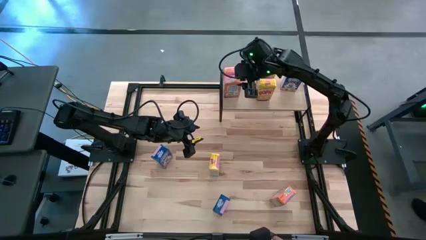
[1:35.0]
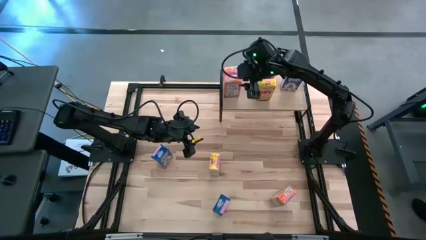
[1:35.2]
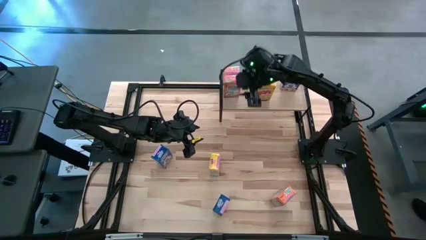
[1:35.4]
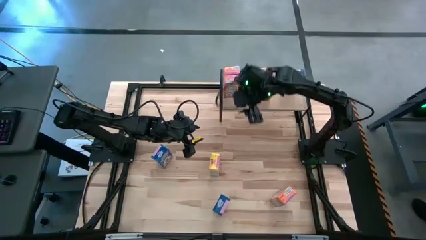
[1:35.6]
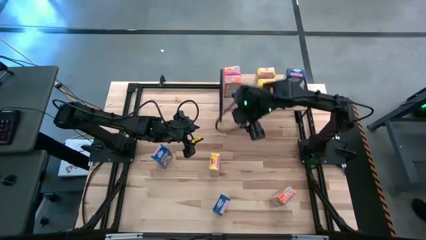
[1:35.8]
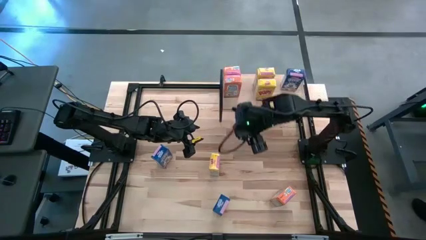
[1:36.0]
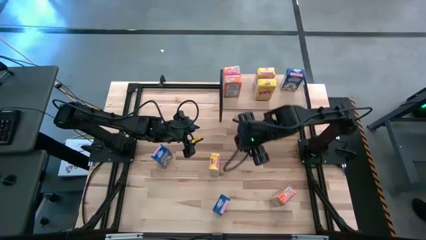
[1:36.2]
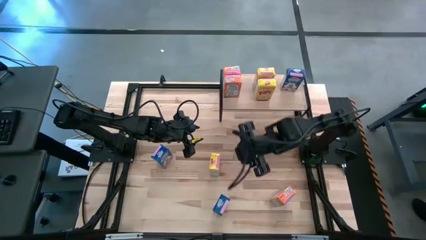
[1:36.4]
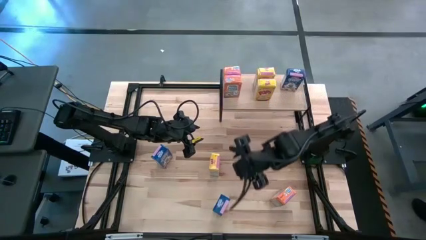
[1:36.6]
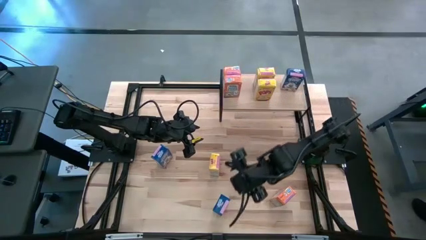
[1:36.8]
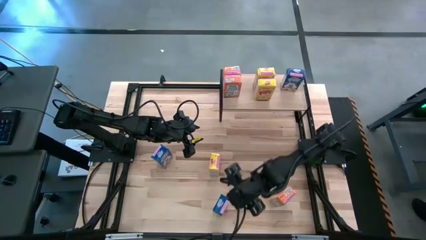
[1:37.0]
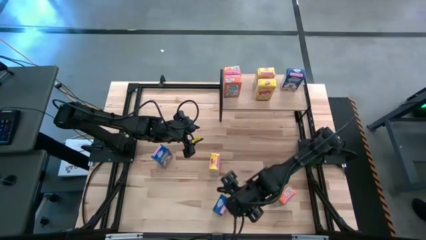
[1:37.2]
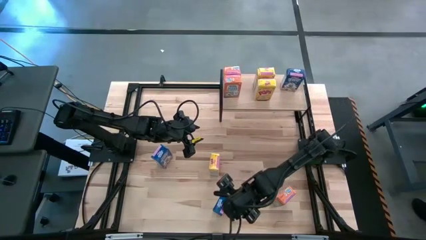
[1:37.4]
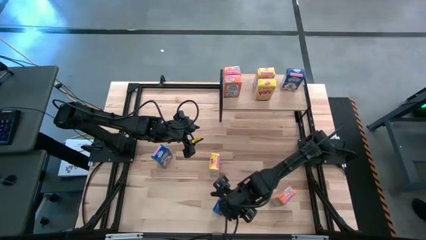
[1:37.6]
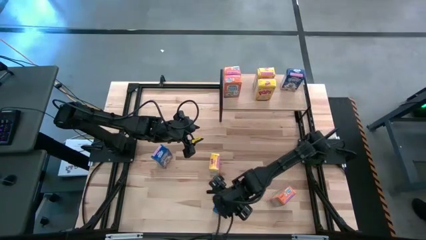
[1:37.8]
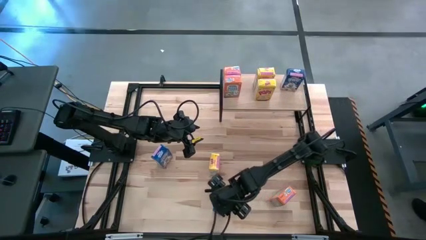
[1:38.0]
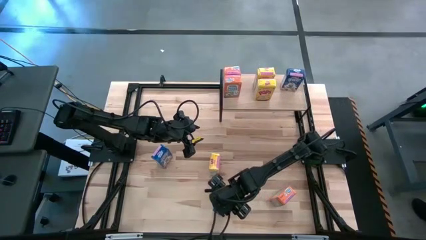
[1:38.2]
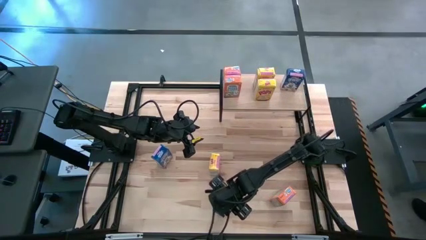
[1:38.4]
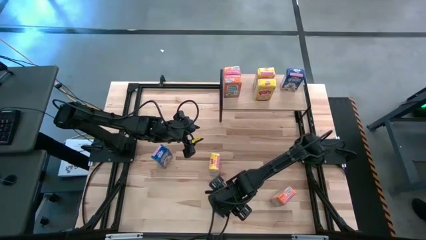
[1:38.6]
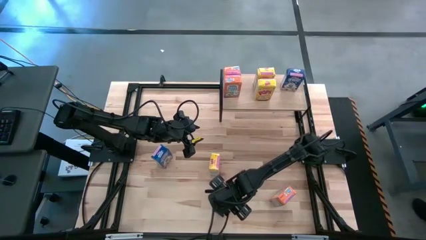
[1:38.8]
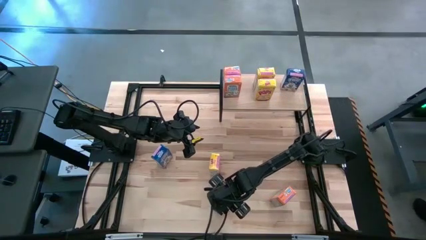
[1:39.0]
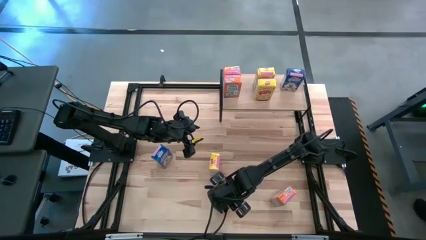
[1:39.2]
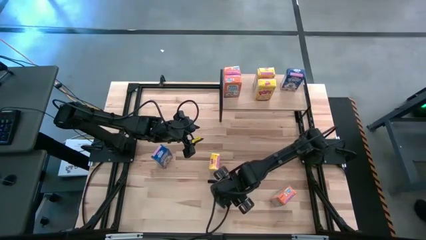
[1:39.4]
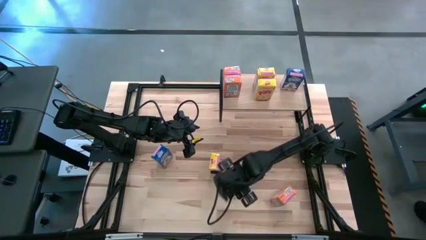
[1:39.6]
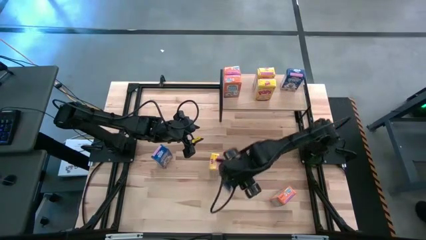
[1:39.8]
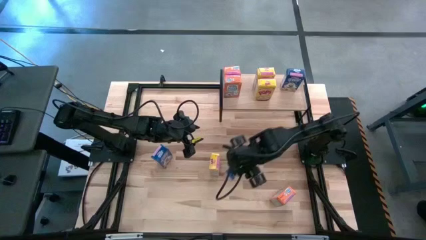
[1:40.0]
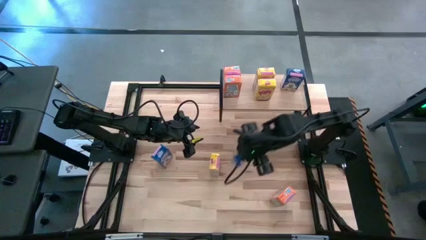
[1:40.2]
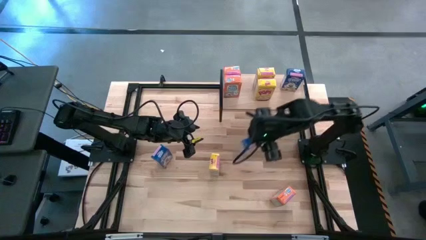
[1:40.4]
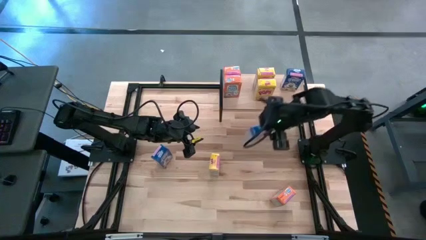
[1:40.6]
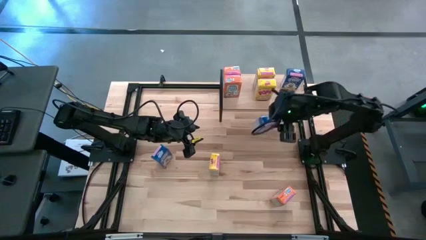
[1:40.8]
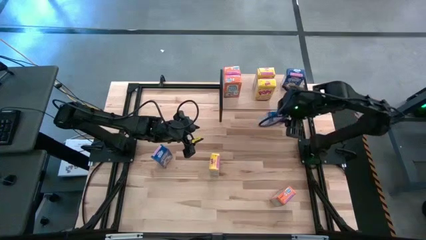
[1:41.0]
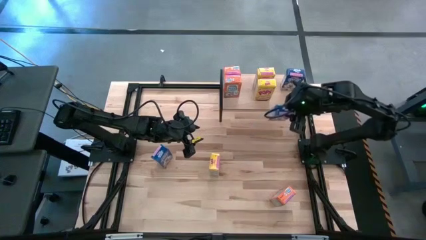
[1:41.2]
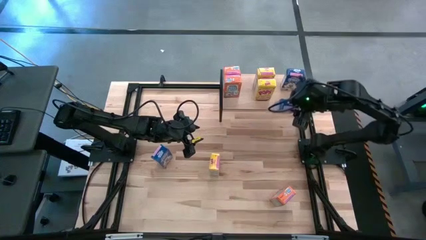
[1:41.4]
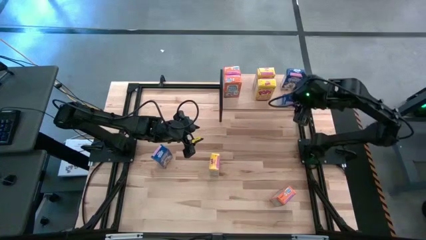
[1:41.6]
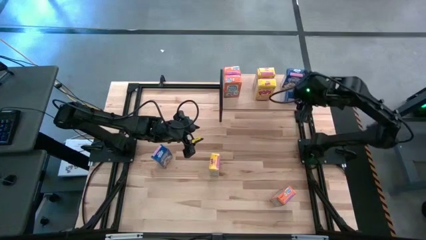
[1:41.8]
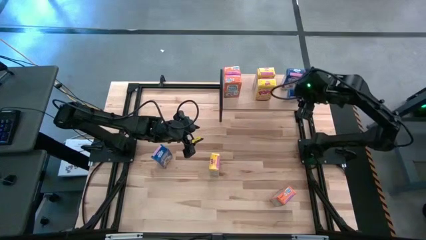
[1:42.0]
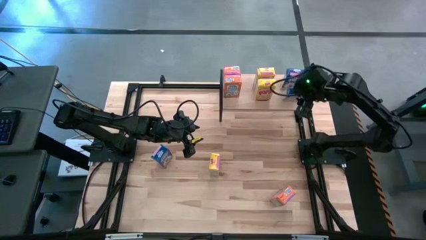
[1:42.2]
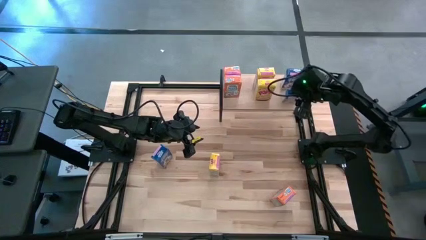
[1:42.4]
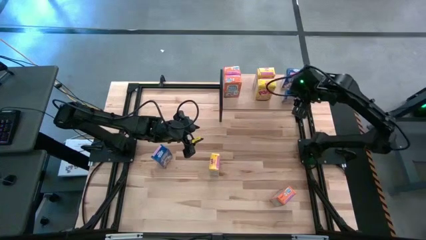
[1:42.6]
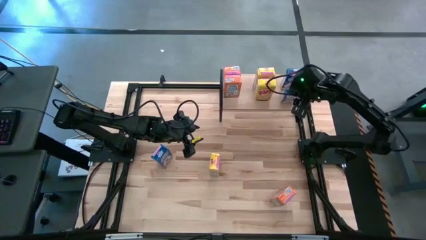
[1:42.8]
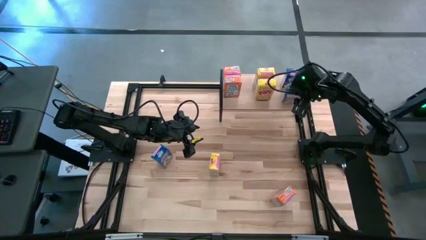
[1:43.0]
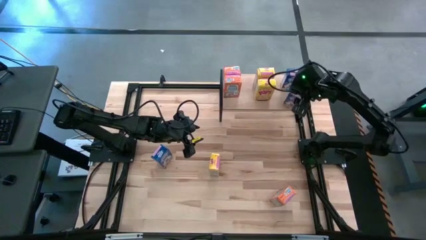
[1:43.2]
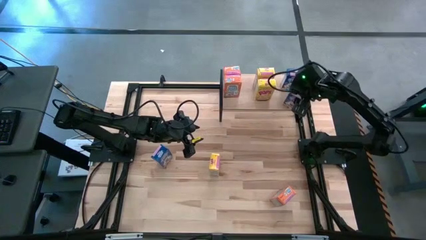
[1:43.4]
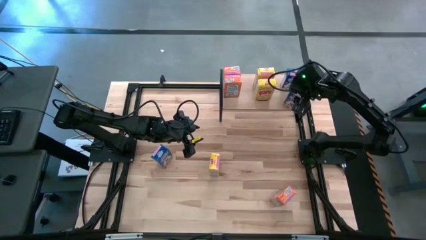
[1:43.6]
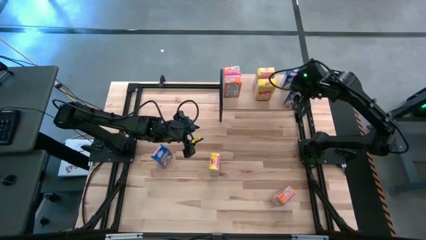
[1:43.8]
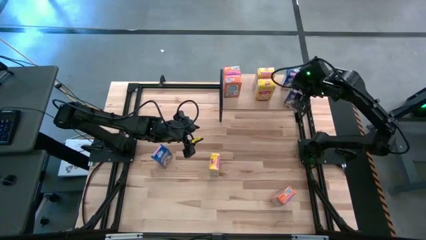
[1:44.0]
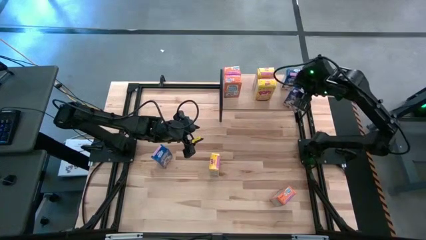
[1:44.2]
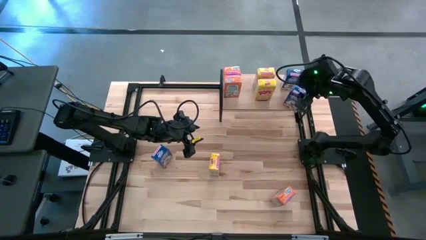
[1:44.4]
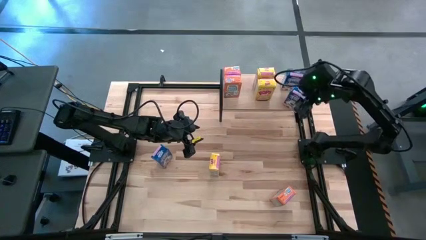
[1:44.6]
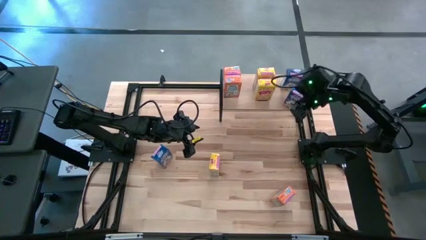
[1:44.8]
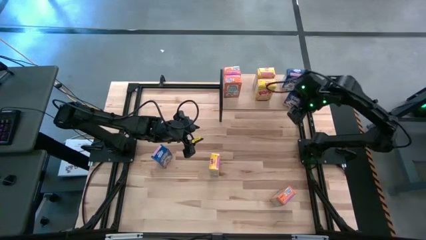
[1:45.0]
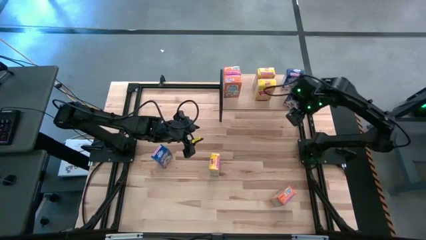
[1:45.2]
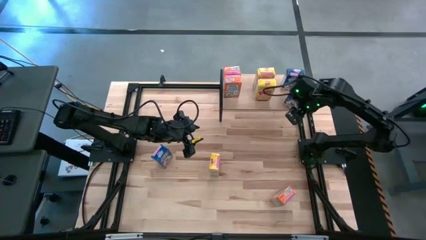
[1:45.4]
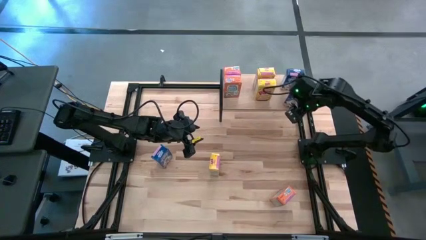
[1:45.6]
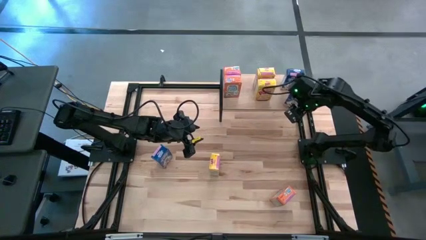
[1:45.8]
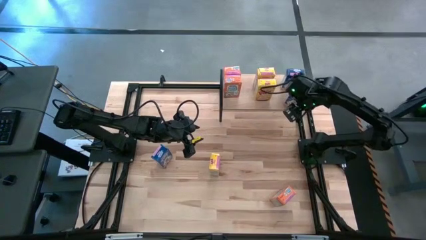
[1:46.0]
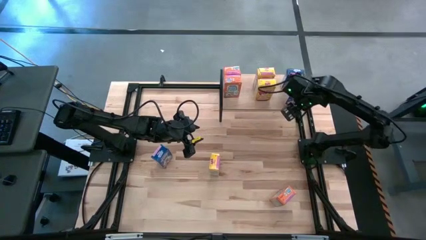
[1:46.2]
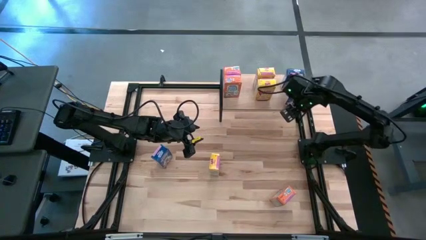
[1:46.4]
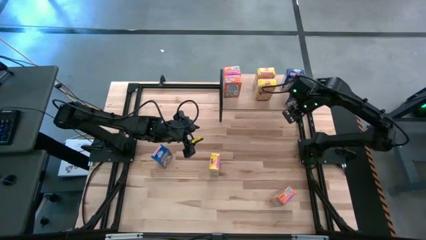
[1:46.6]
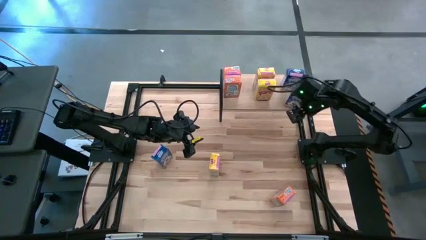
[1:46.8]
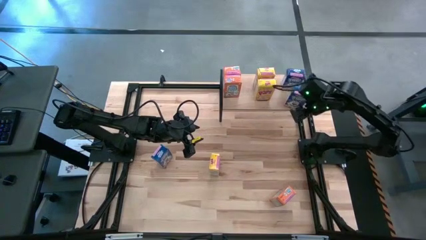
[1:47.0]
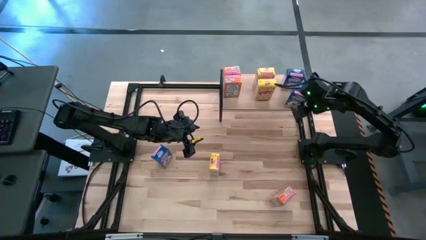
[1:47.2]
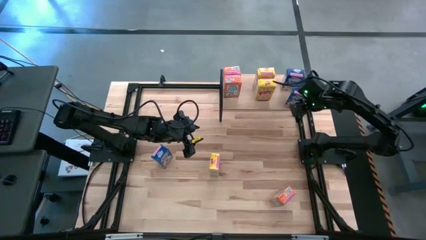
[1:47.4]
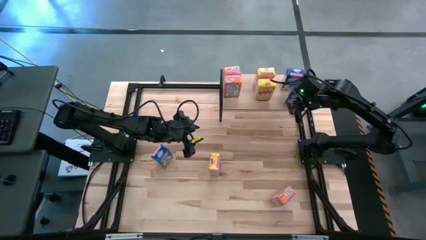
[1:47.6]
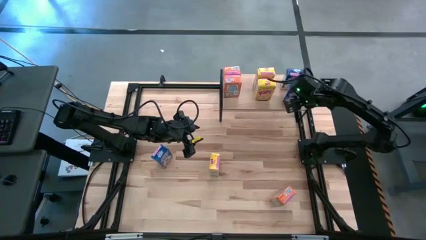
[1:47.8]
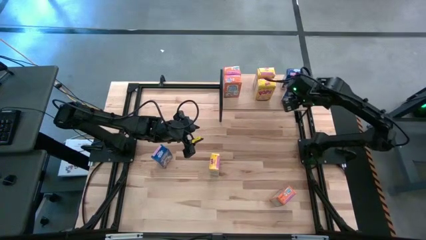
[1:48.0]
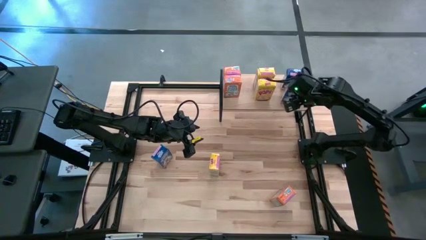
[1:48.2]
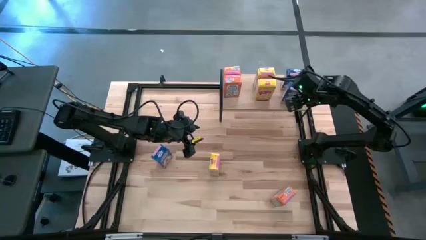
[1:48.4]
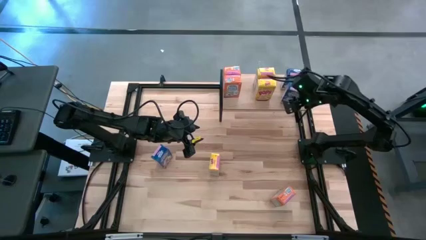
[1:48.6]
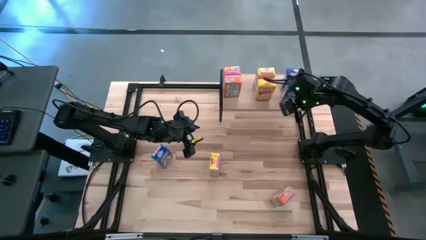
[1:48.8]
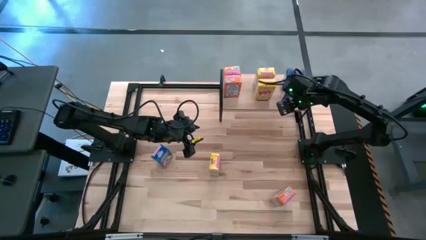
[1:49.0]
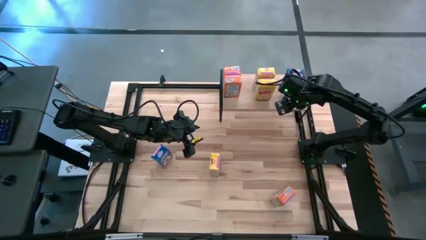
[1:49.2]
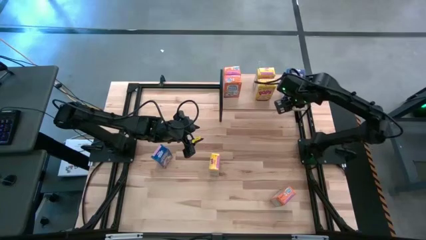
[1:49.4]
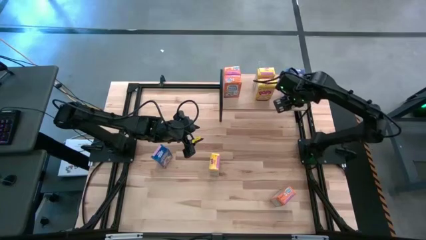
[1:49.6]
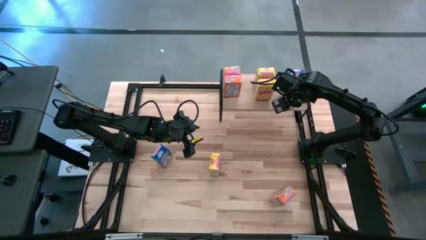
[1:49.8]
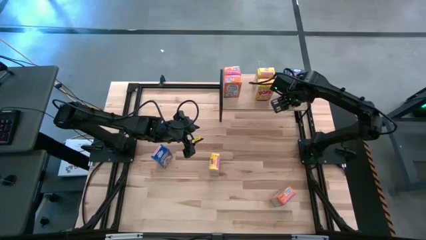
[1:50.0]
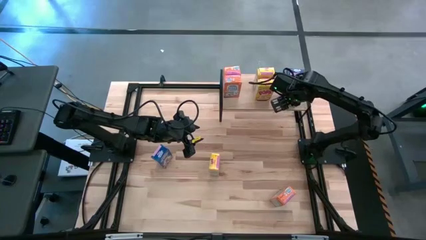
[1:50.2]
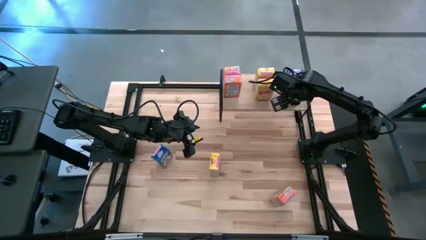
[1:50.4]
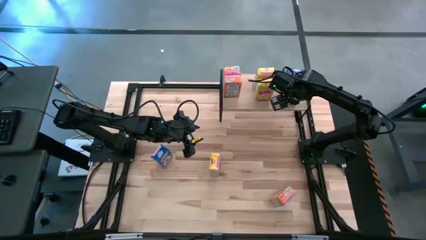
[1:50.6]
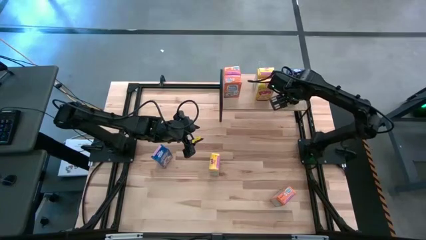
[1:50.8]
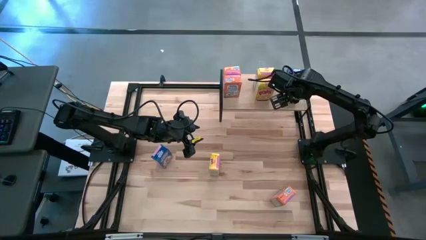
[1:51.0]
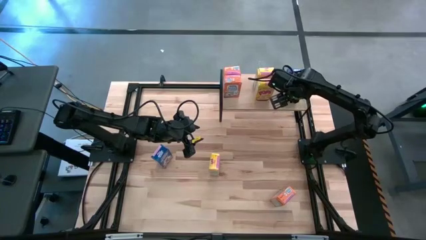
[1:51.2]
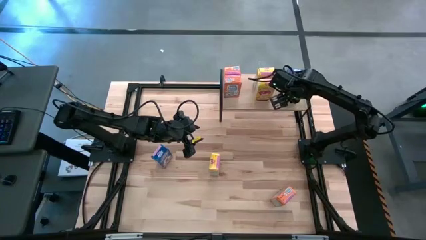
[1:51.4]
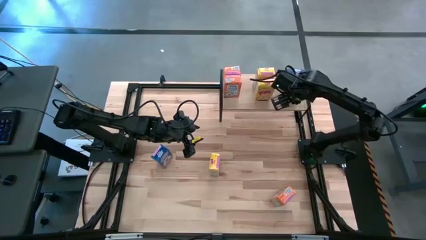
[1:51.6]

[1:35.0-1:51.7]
Task: Stack cereal on shelf
Put the bottom blue cereal box on the shelf aligned with the blue cereal box

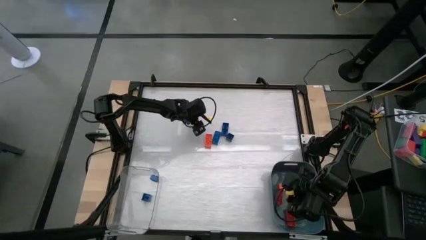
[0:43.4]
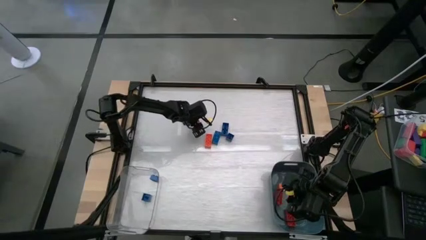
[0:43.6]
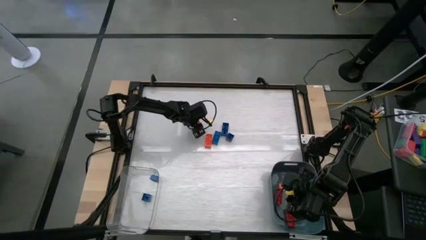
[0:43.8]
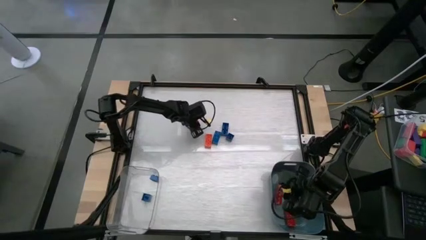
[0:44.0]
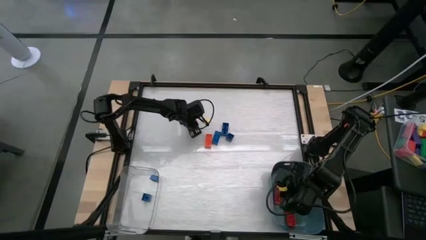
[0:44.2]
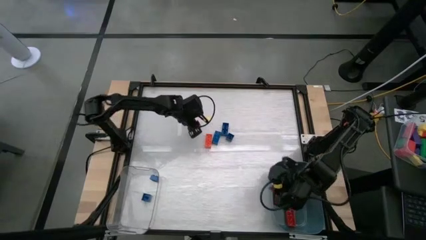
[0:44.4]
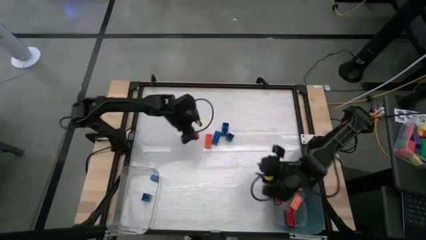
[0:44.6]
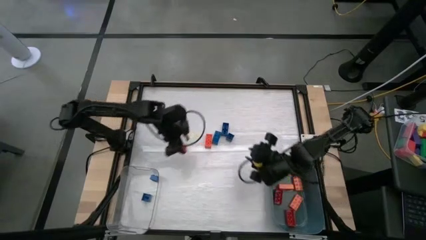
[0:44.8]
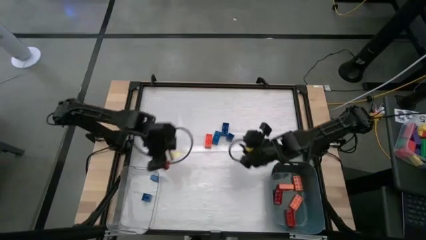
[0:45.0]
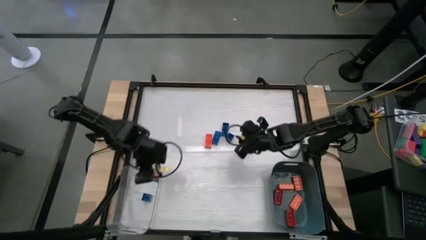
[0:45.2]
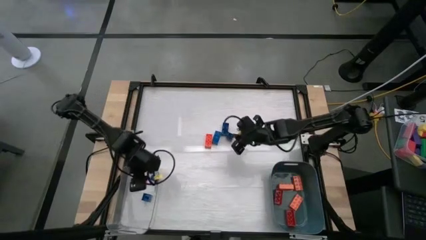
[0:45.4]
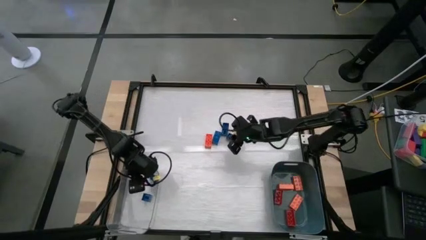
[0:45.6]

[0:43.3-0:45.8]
Task: Sort blocks by size
Put the small orange game piece into the transparent bin
